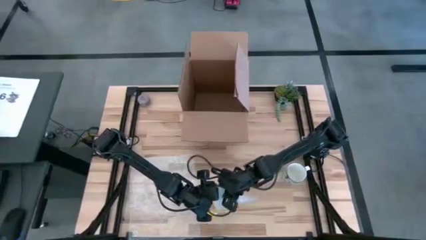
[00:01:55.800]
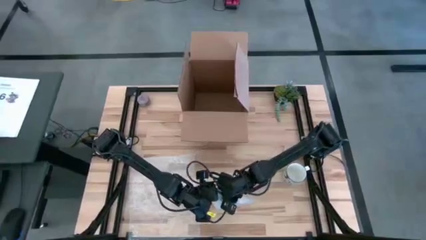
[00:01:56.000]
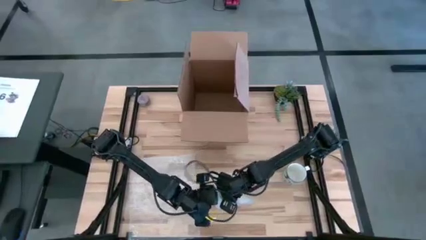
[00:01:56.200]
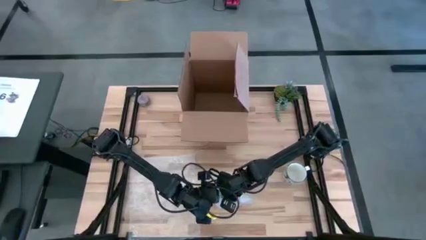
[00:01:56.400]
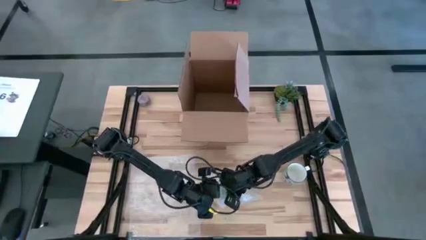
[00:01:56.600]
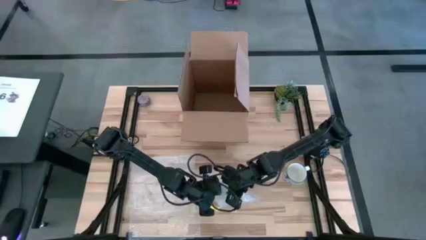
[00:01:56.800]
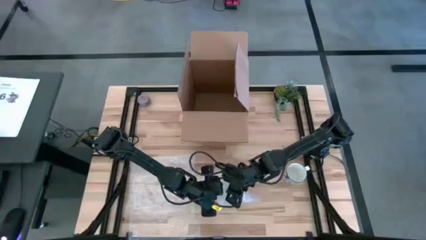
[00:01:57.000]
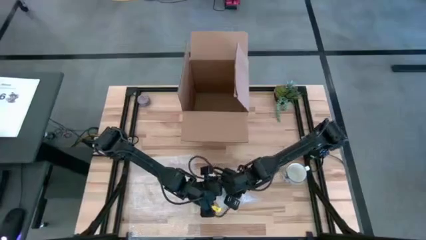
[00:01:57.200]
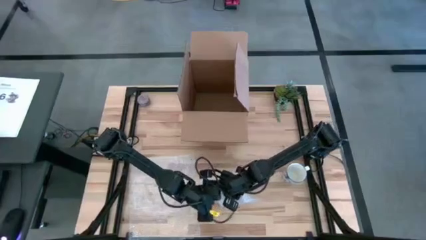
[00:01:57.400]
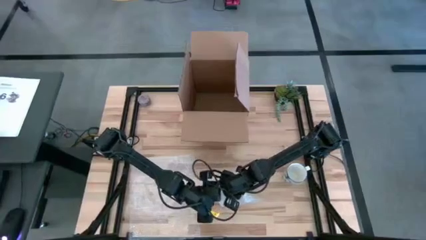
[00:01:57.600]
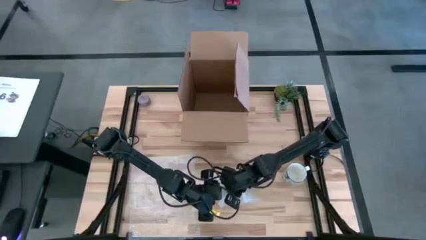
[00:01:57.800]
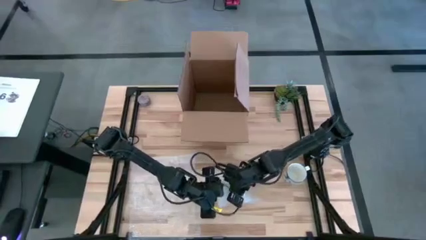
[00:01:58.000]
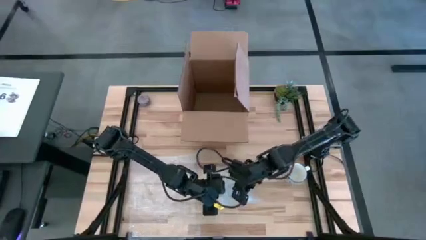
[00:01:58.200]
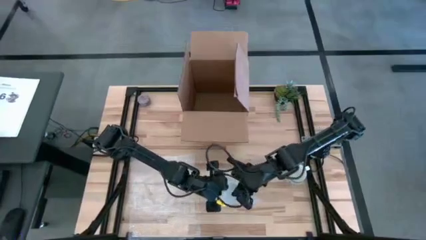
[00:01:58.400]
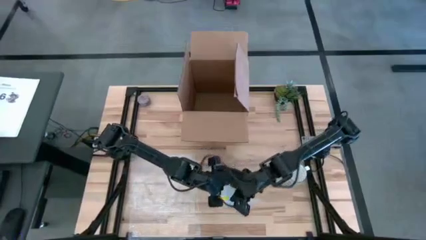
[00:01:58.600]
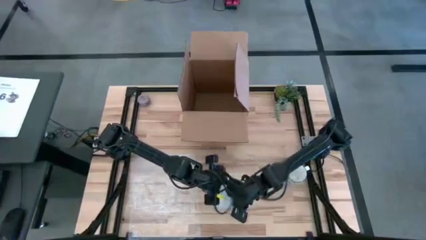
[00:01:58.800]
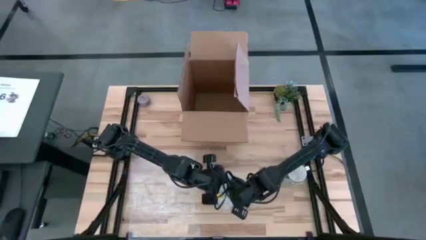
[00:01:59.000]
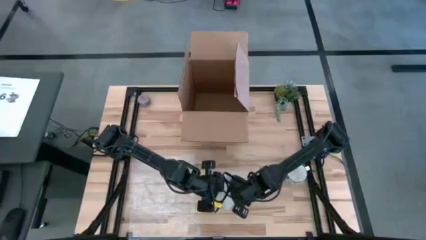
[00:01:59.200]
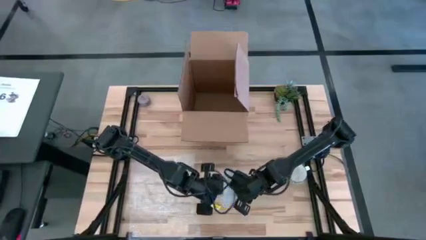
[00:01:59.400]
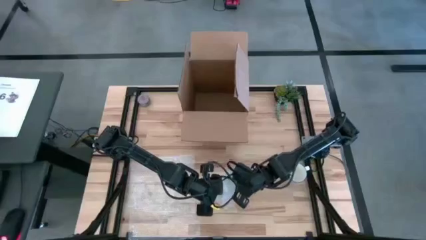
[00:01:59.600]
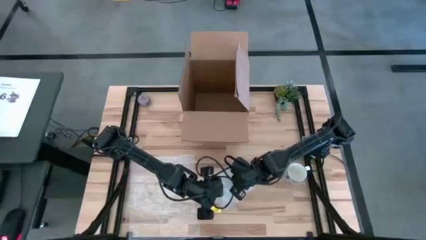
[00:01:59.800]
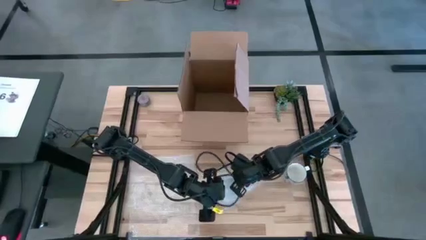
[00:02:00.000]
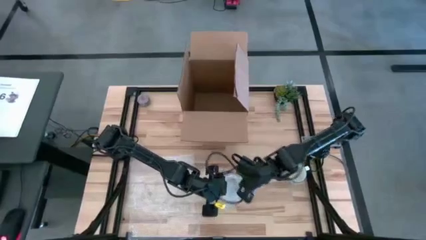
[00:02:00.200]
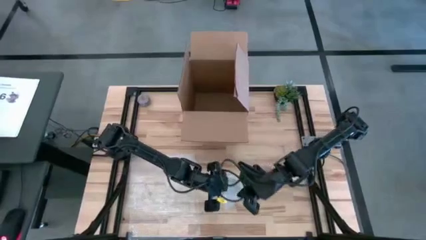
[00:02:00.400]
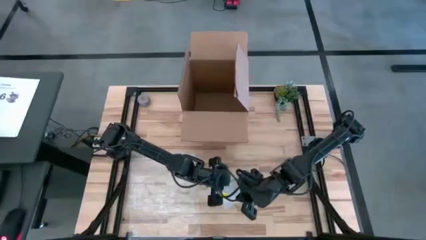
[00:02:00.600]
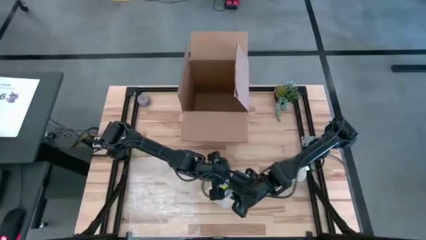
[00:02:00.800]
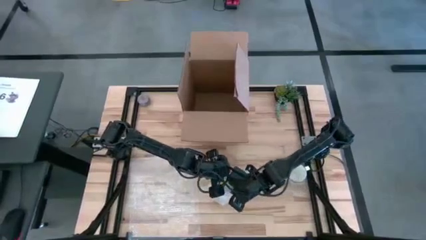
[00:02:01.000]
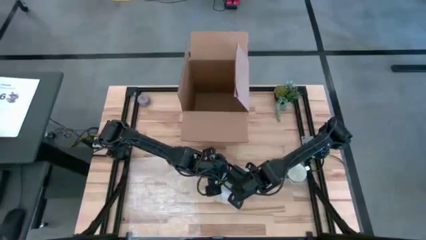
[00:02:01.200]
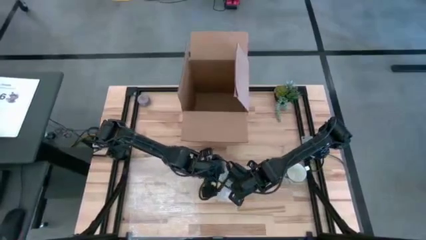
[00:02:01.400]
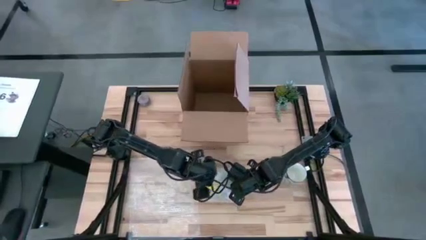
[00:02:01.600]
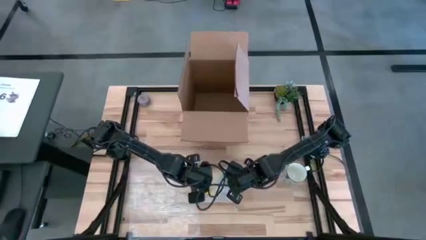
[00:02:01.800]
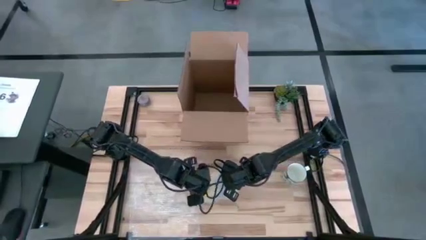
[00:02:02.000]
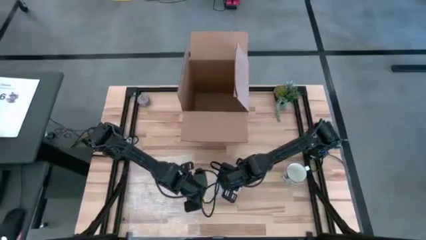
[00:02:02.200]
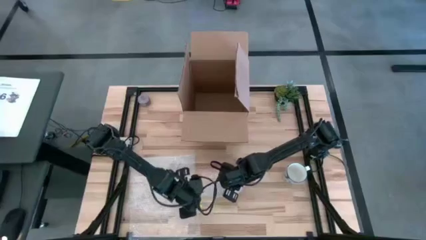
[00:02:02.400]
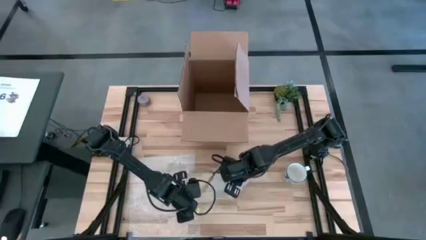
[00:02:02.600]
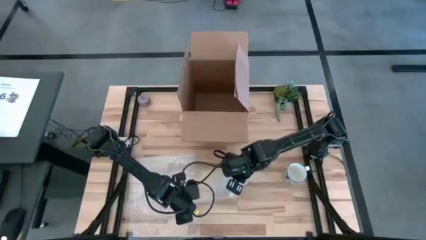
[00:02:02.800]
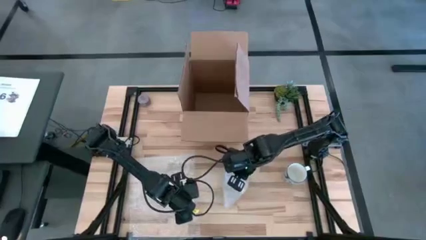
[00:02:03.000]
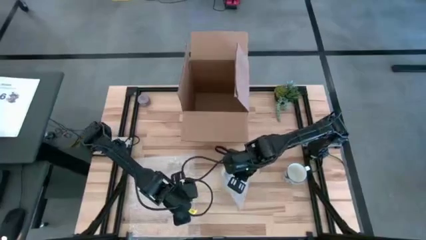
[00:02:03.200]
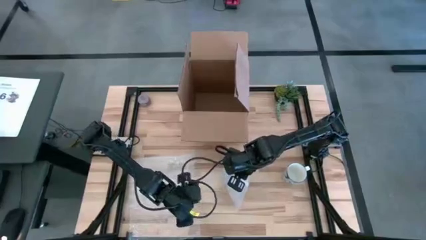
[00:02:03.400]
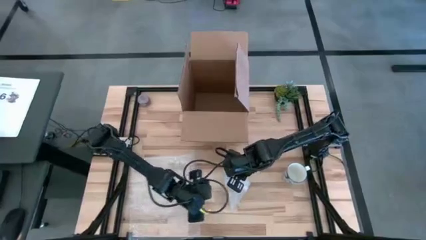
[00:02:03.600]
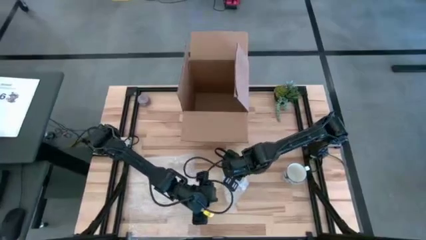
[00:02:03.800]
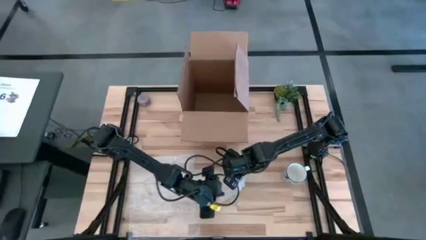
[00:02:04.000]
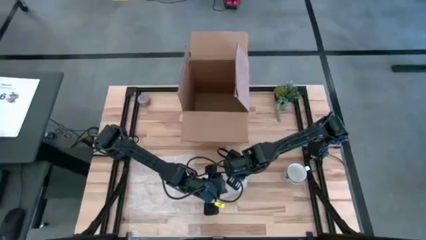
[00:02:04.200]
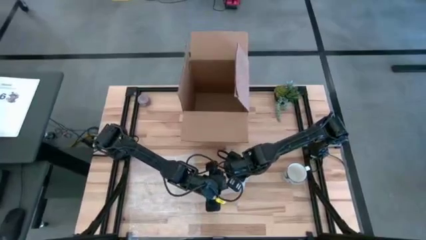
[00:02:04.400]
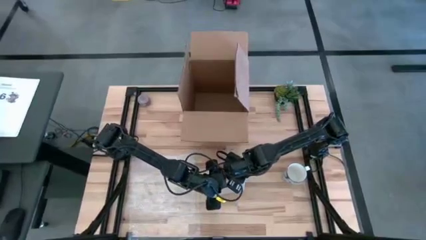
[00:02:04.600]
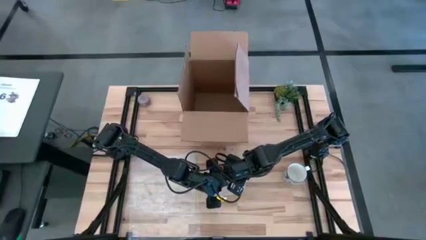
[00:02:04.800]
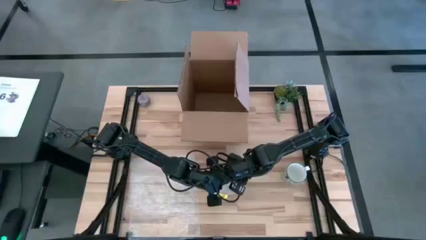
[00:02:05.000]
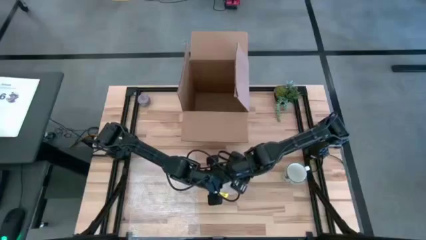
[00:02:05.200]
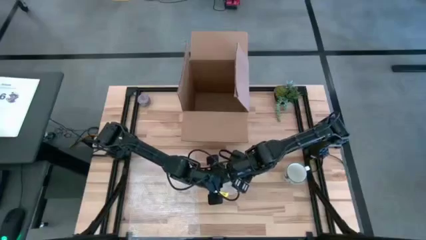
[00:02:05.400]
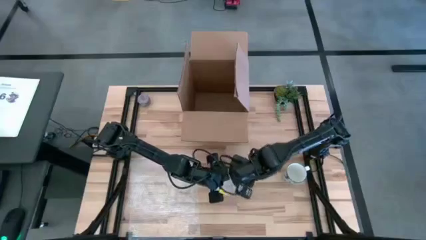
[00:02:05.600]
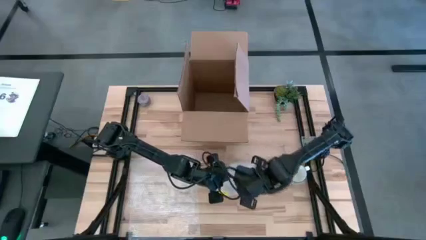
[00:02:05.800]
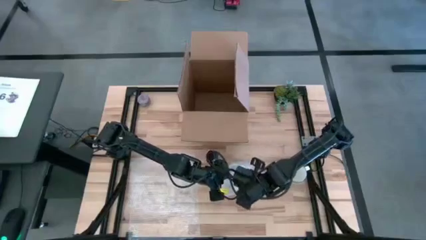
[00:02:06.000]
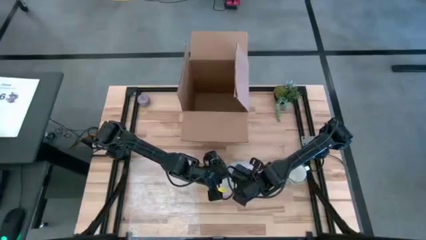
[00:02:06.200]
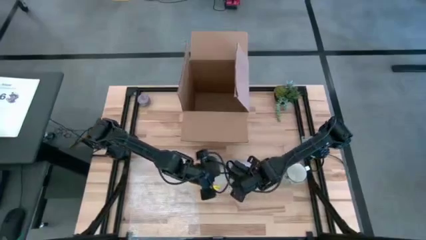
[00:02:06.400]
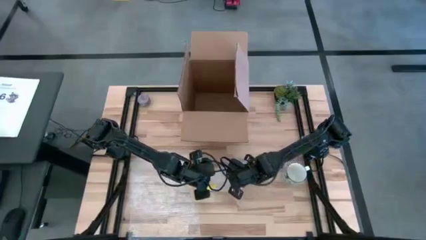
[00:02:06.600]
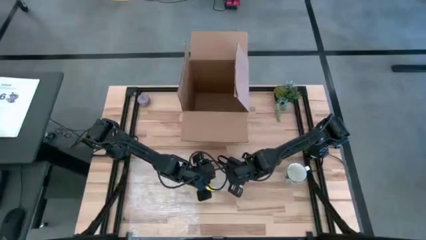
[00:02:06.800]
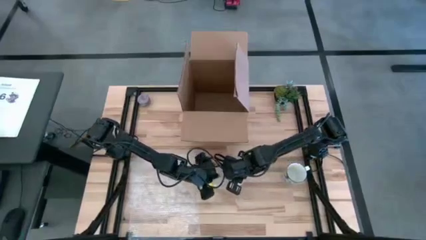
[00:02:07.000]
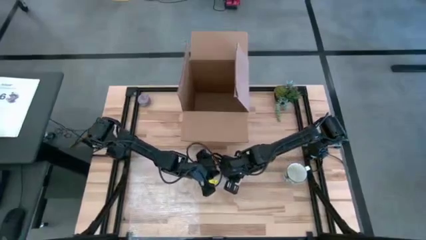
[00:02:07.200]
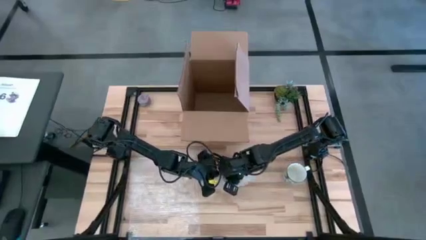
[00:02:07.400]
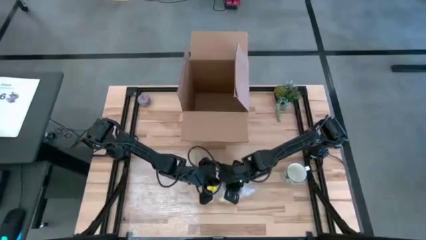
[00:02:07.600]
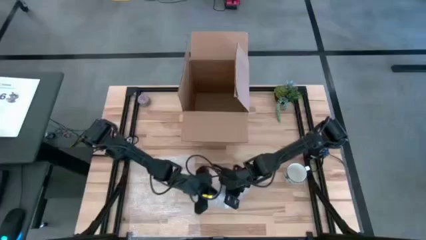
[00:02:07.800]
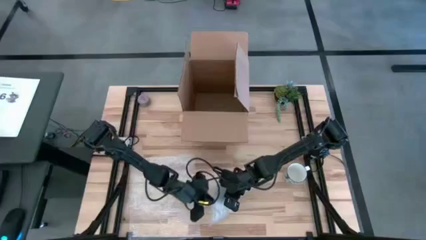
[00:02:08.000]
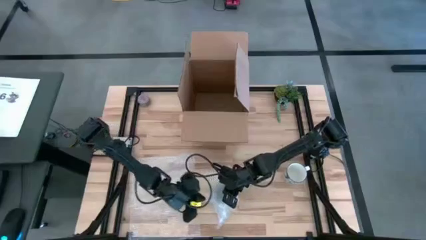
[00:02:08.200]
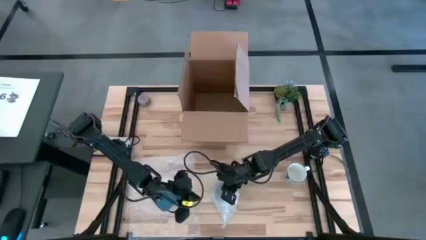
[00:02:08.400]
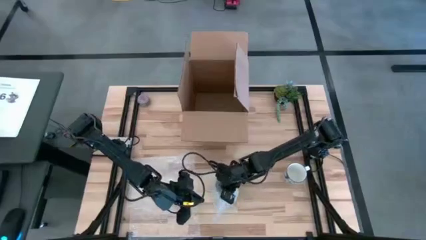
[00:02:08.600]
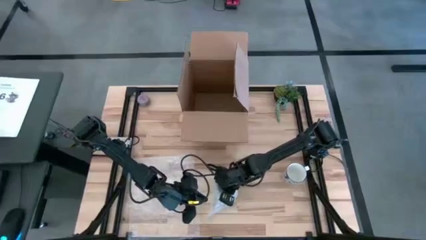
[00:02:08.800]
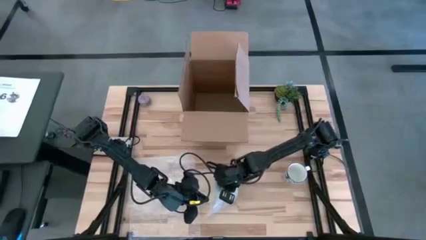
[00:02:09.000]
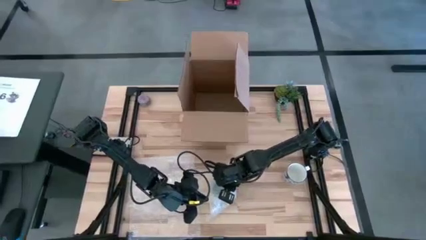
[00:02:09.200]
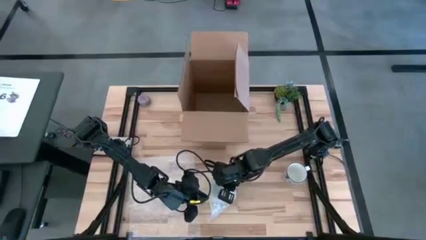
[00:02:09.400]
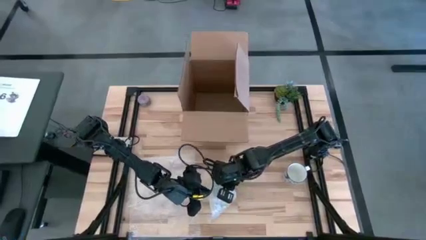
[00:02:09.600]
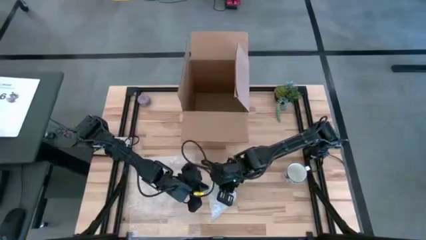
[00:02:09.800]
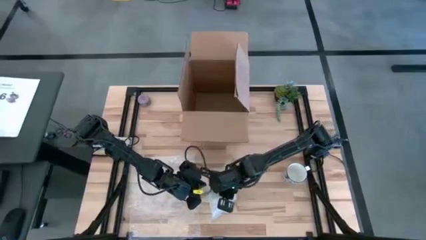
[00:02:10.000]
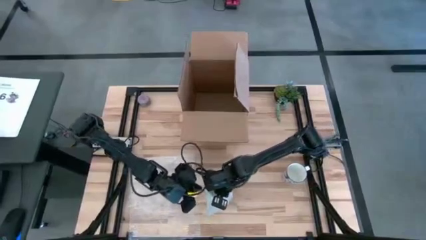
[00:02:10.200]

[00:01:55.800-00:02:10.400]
Task: wrap mug
Wrap the blue patterned mug with the right transparent bubble wrap

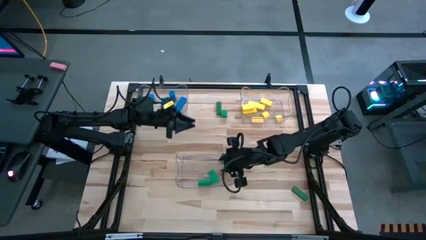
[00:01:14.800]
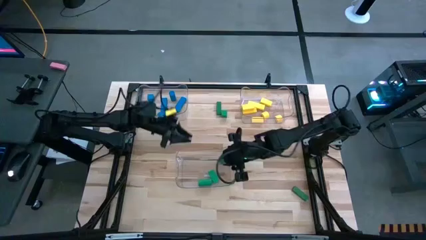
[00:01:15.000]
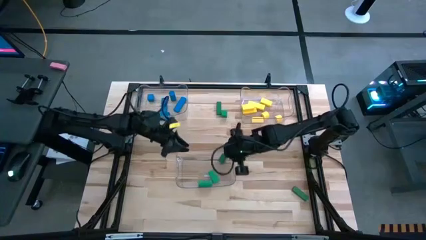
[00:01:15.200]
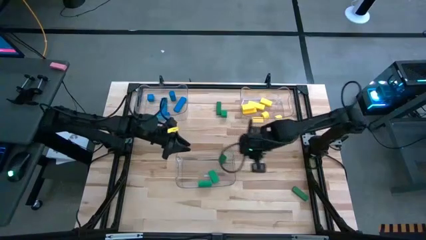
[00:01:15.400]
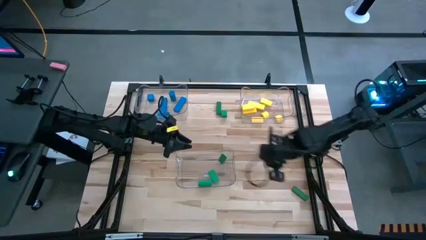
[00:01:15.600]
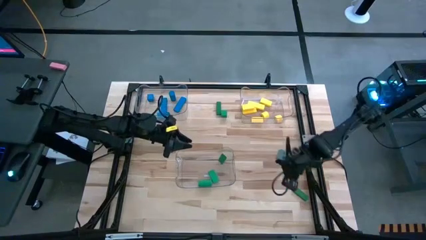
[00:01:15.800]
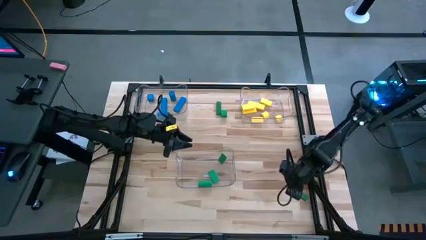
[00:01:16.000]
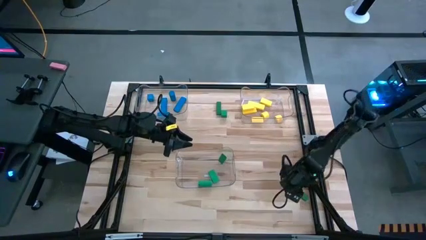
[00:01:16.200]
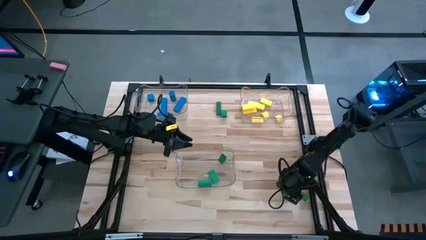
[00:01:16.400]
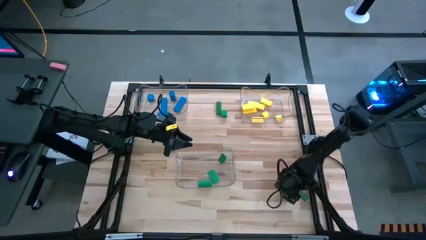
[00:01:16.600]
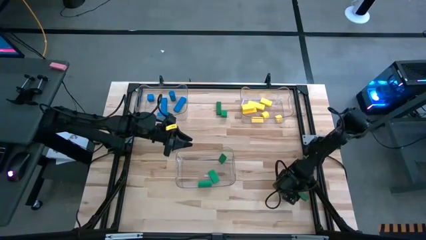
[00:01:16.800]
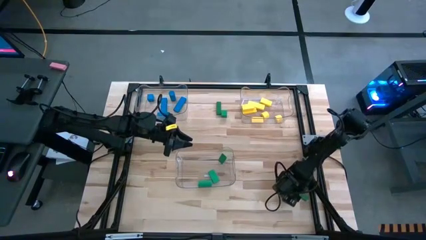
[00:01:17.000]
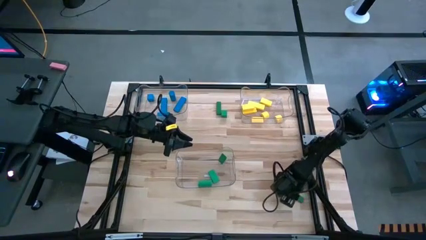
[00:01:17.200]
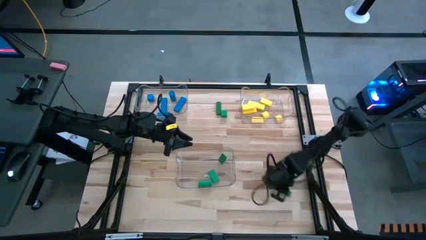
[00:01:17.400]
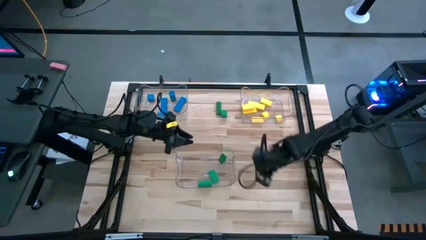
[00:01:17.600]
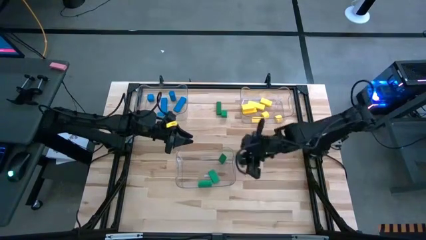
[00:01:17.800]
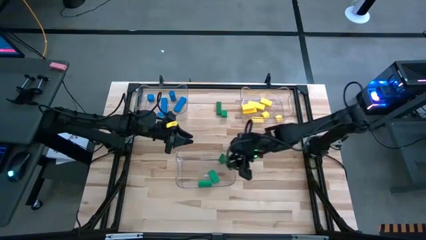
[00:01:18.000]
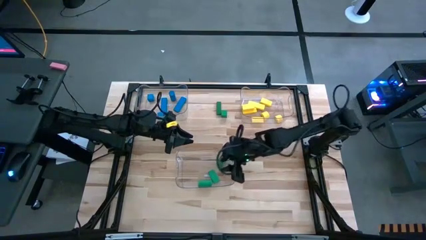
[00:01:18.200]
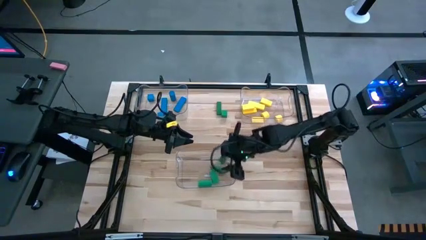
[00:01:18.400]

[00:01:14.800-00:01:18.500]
Task: Sort blocks
Put the green block into the bottom transparent bin
